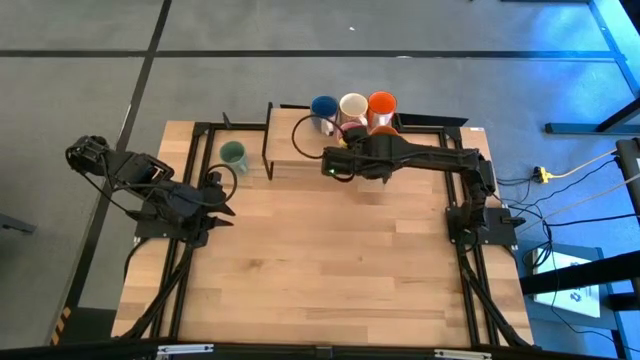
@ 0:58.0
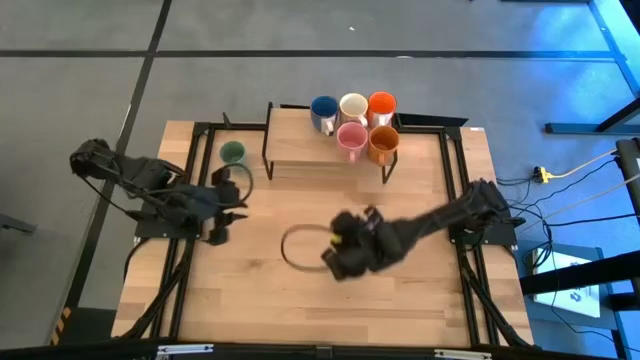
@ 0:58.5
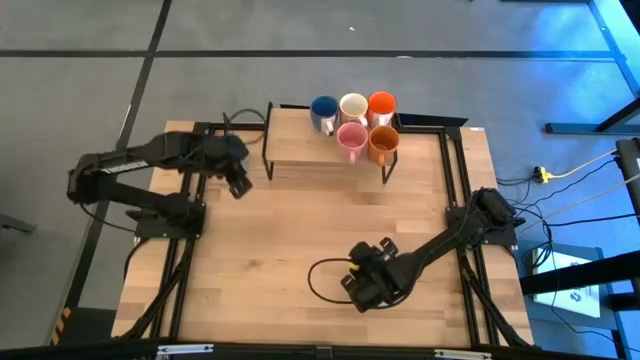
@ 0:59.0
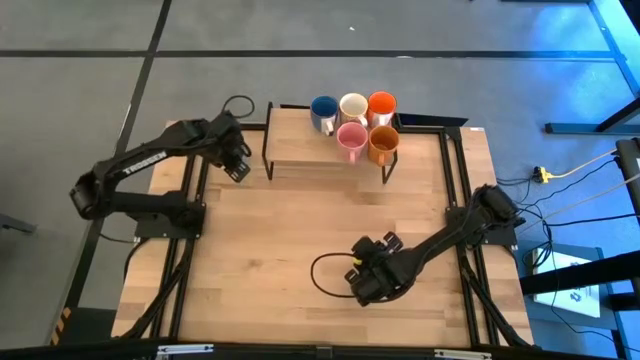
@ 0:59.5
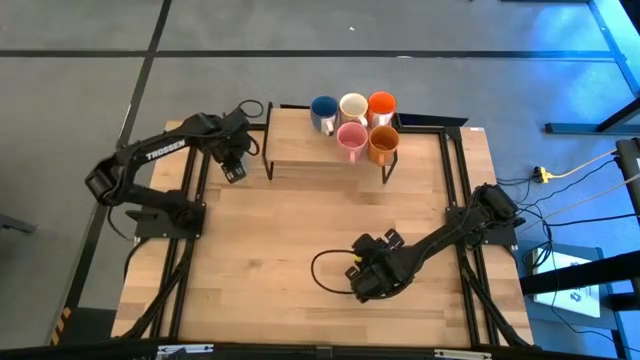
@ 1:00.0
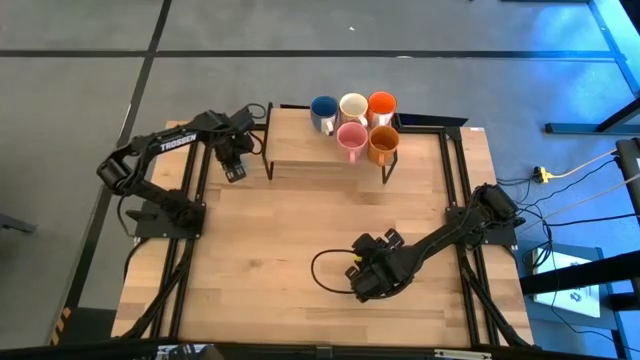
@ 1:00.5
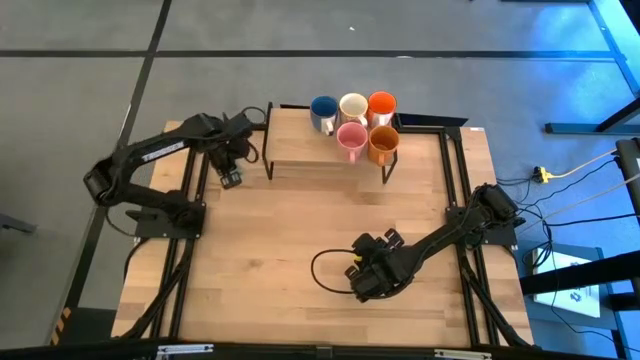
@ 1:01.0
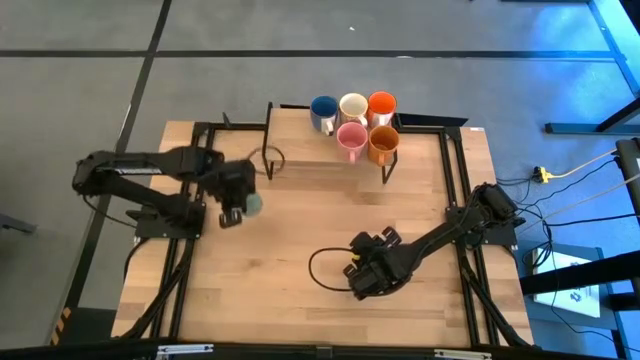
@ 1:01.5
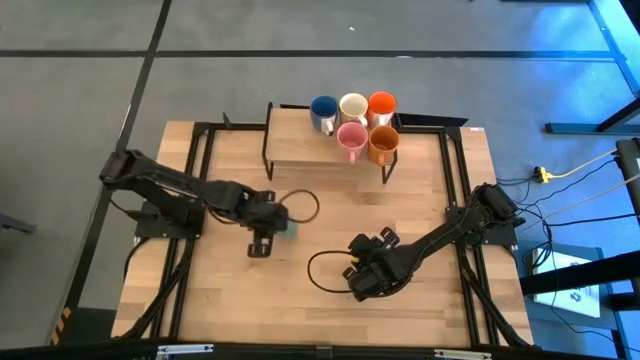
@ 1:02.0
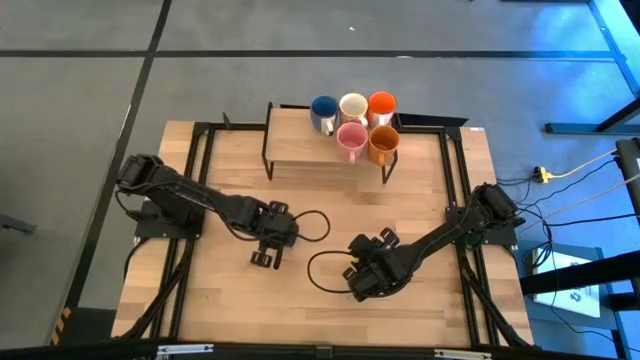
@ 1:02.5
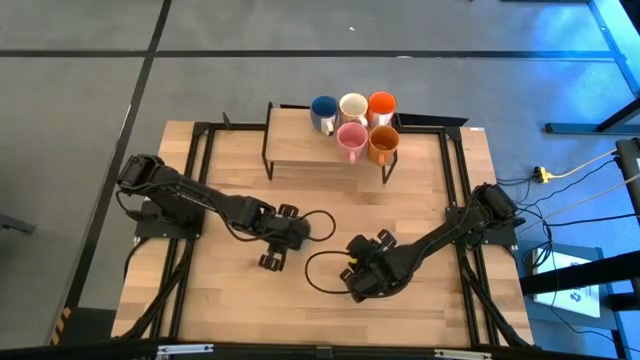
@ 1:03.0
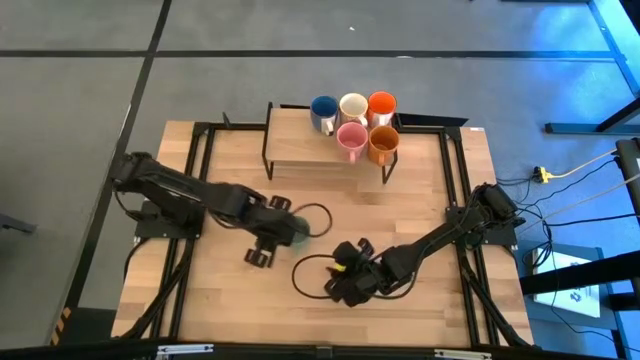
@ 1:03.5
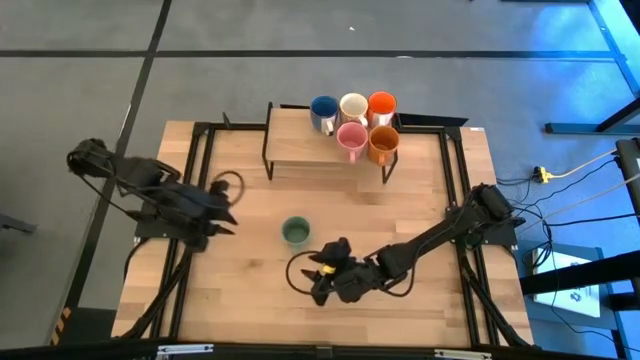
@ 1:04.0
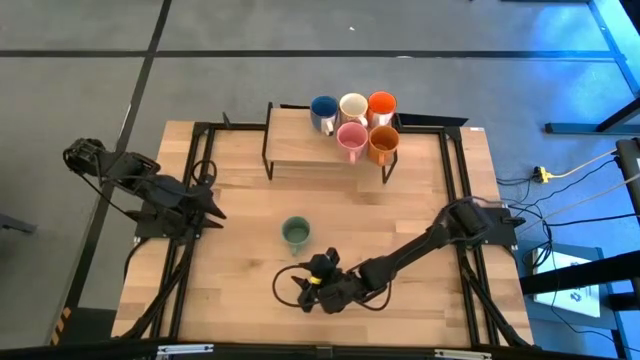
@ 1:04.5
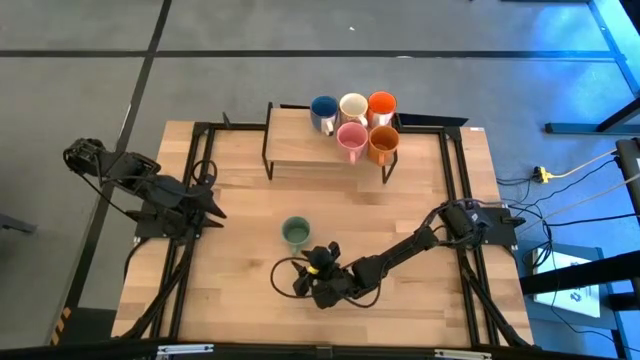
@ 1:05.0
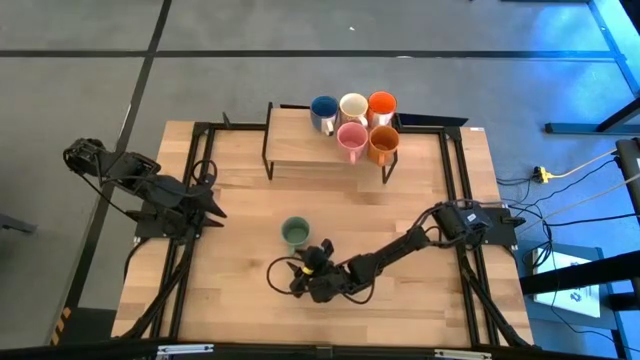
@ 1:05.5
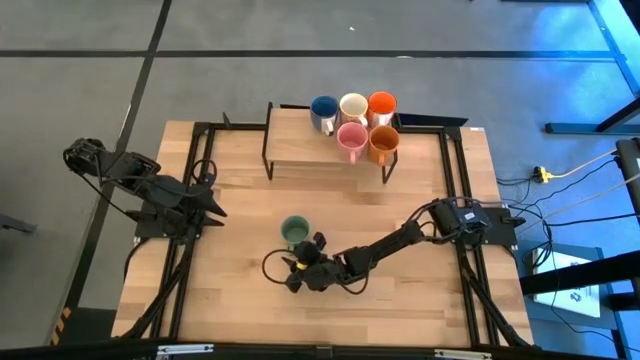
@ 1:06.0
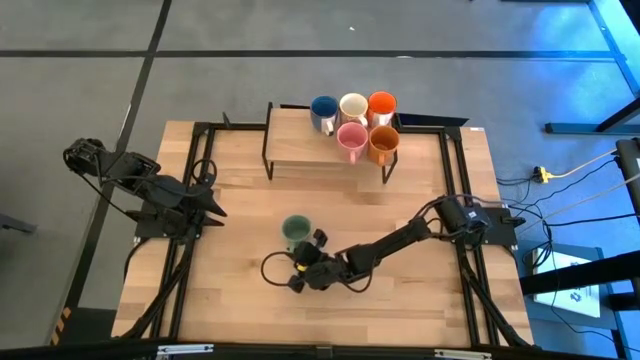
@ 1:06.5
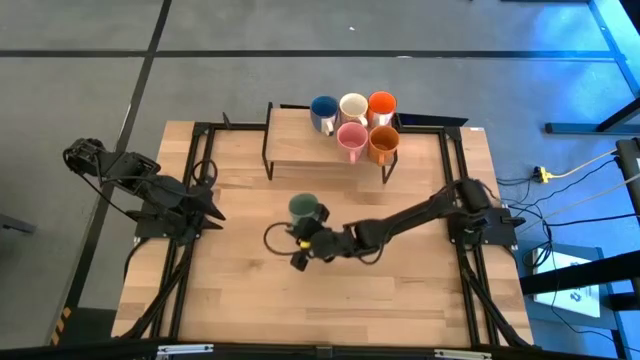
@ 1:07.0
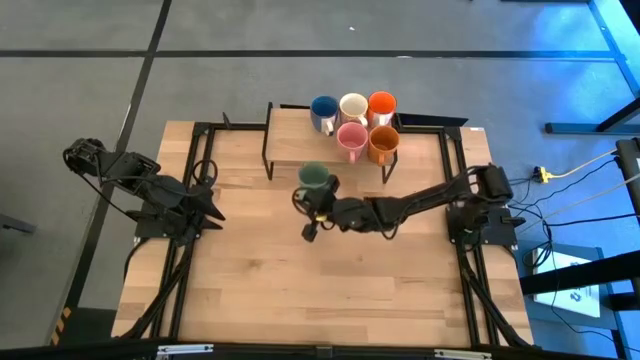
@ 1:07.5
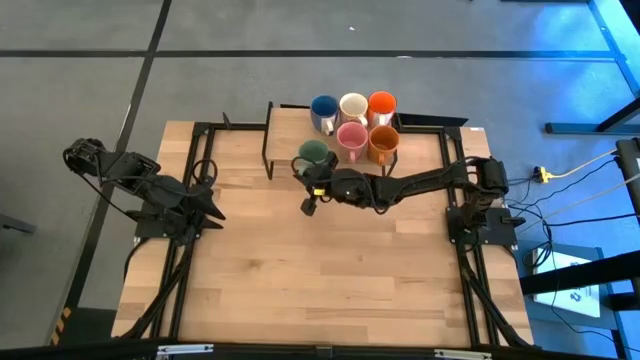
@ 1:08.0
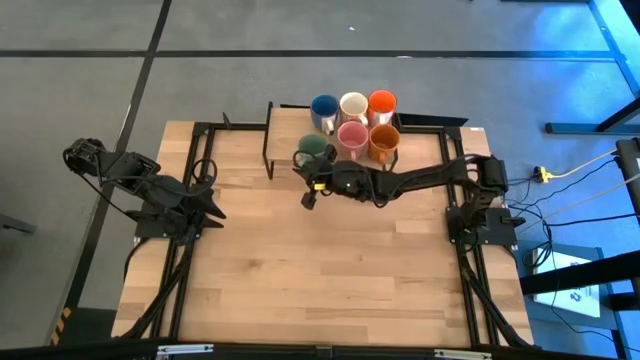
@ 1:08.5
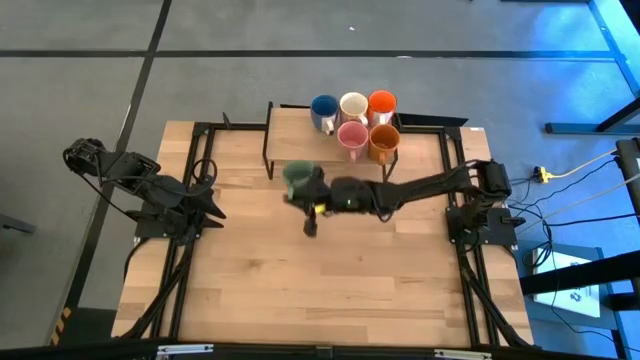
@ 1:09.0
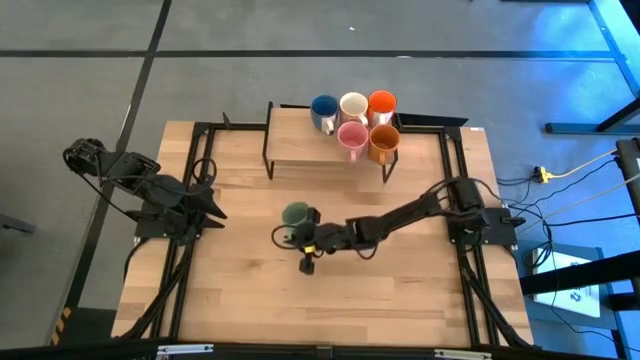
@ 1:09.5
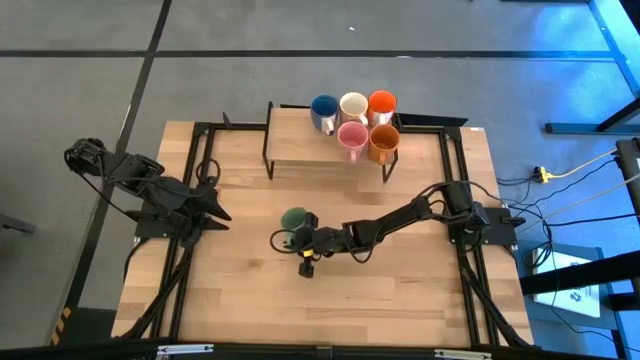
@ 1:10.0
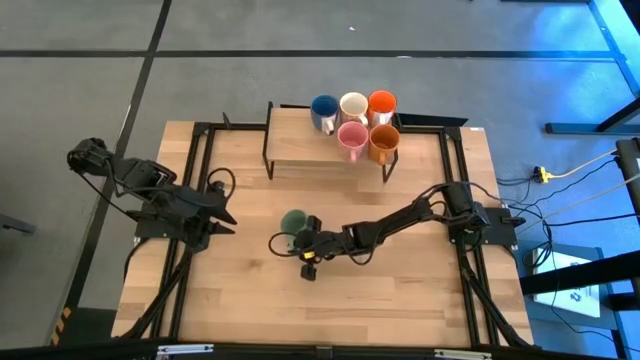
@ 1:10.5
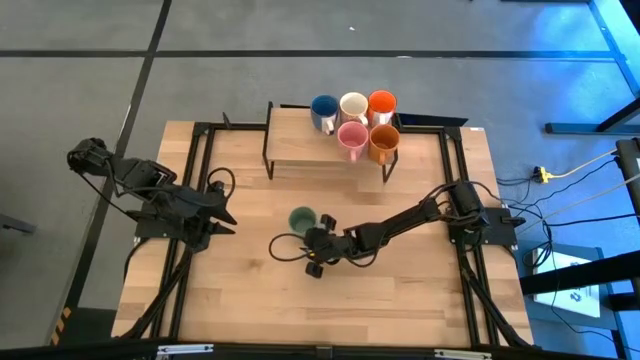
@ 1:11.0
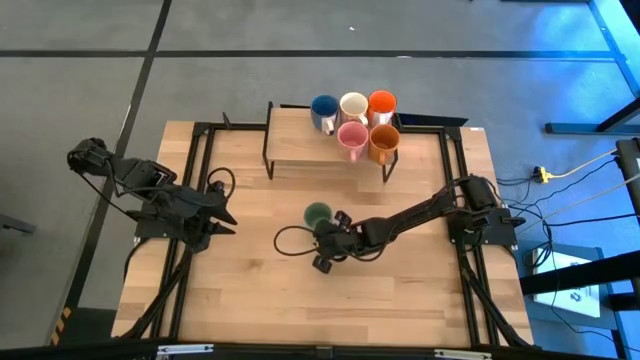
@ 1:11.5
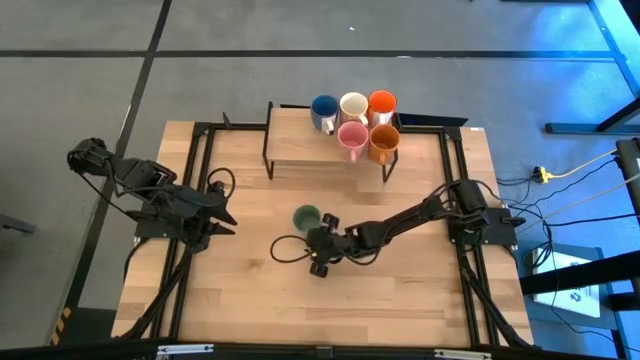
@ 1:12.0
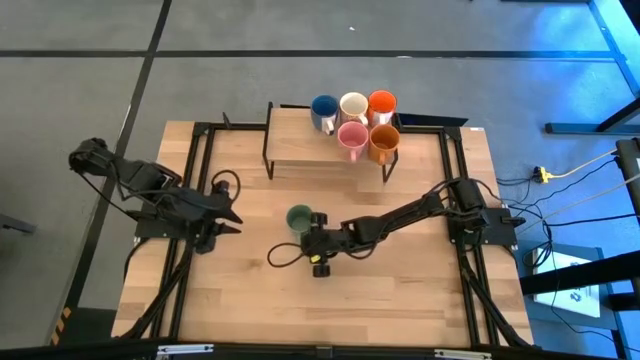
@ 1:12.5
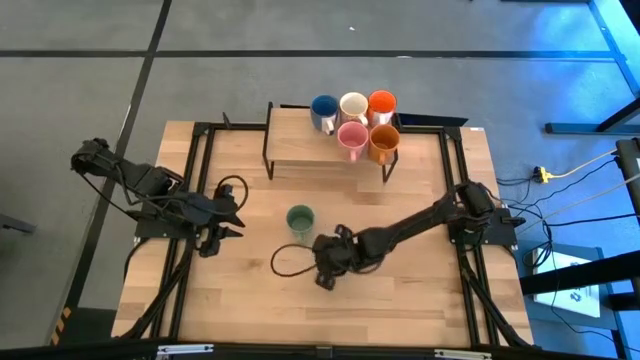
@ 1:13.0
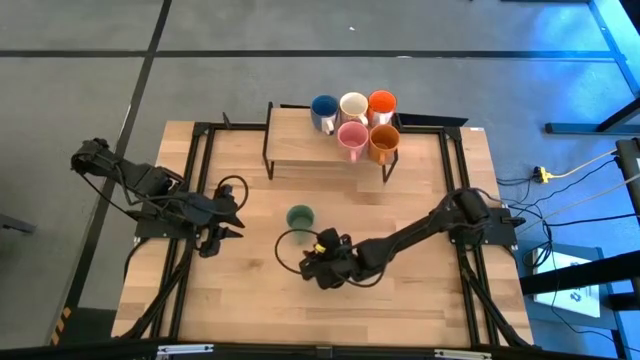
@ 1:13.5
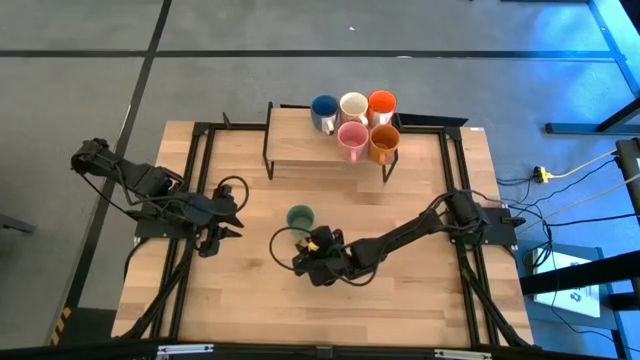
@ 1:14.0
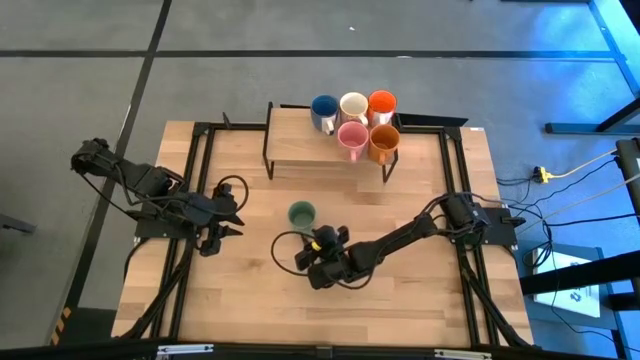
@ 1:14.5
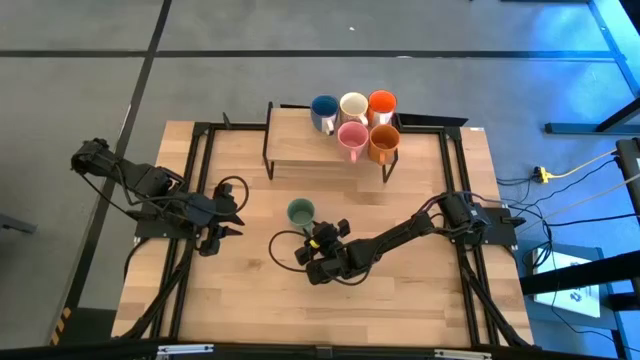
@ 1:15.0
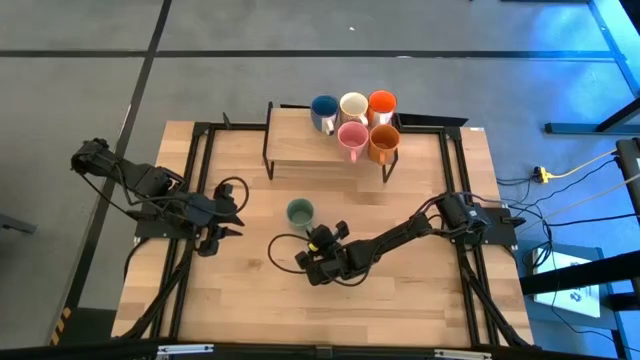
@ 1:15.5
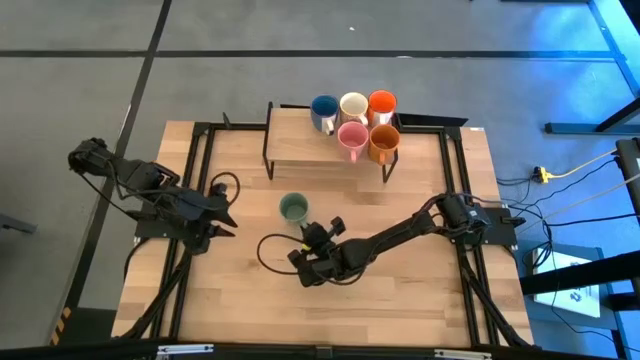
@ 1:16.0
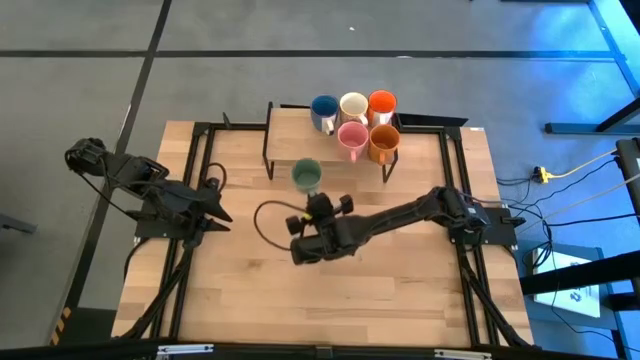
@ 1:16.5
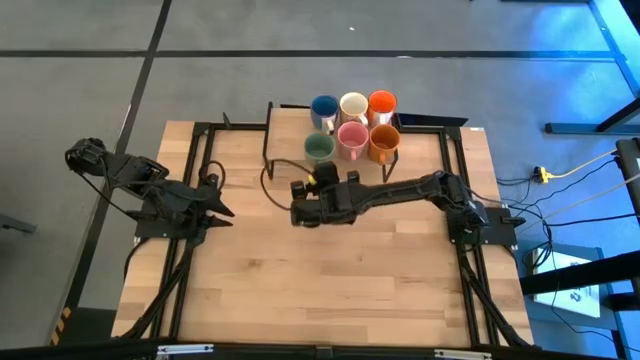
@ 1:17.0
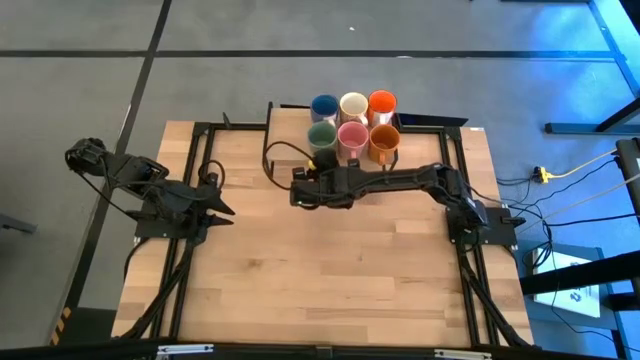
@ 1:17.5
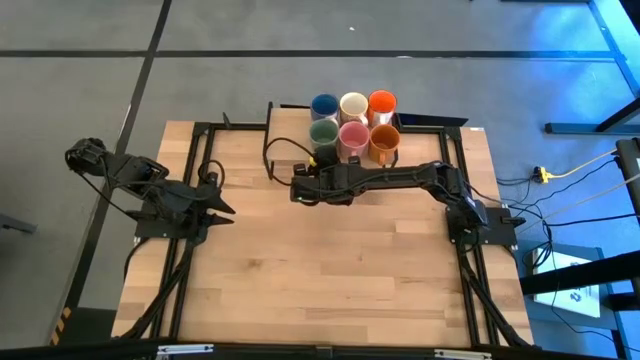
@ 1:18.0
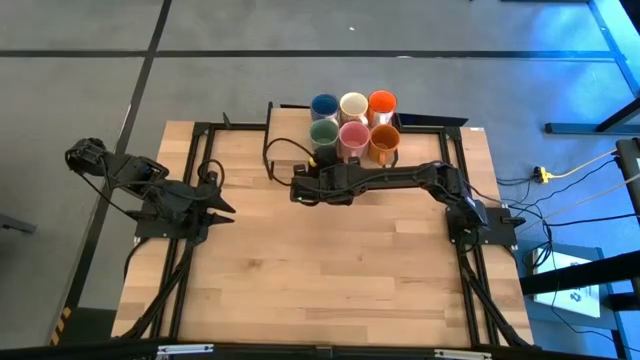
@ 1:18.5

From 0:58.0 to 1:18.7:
Task: Place coffee mugs
Put the green mug on the shelf
